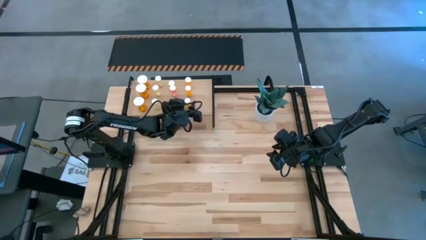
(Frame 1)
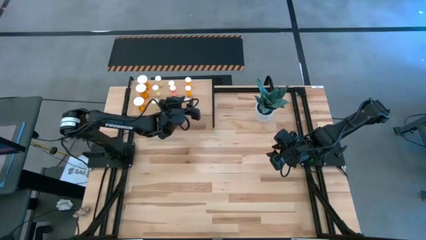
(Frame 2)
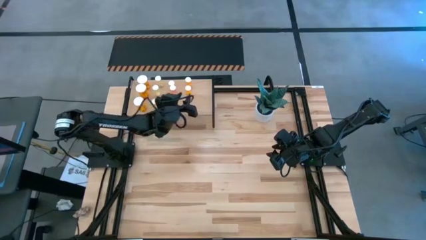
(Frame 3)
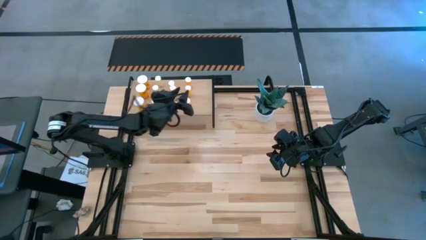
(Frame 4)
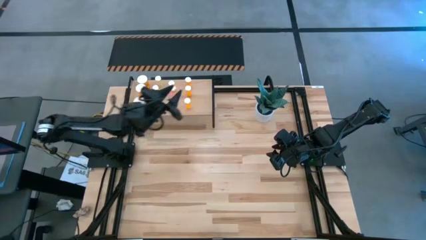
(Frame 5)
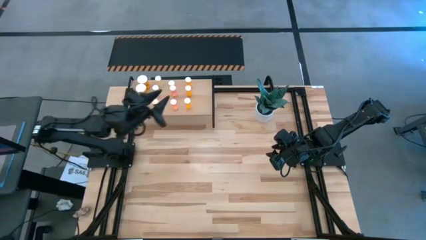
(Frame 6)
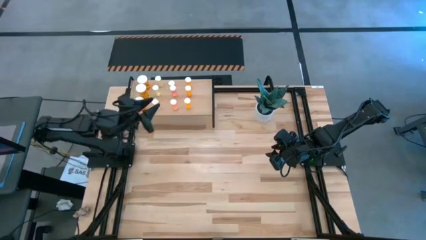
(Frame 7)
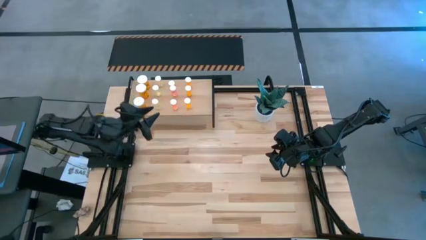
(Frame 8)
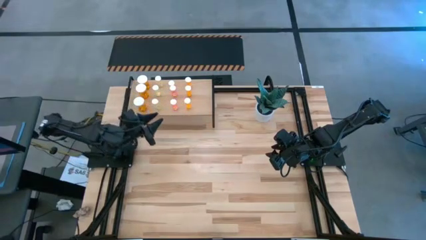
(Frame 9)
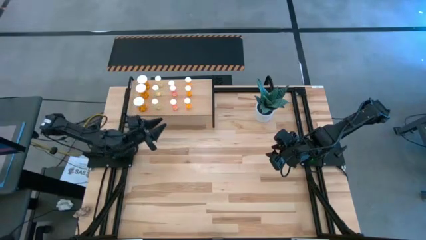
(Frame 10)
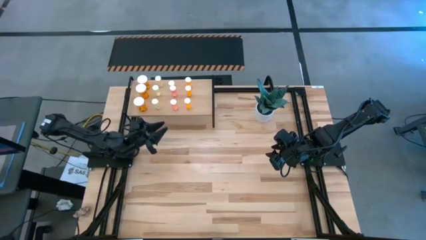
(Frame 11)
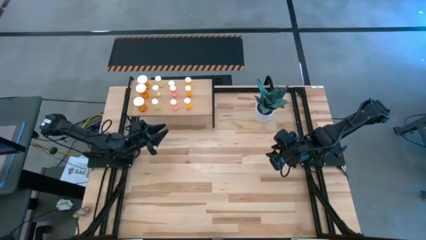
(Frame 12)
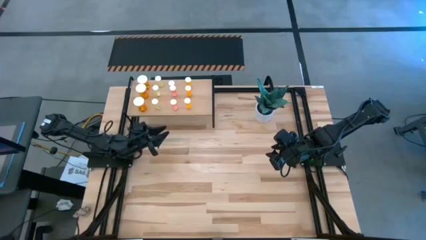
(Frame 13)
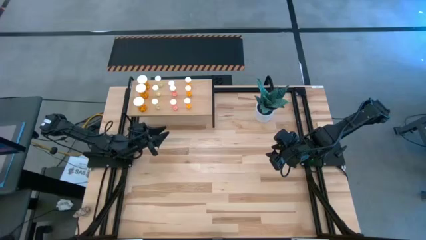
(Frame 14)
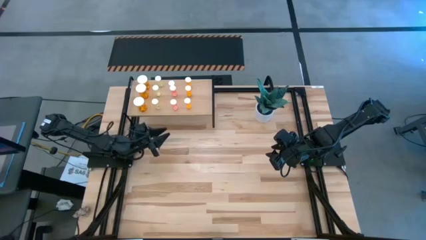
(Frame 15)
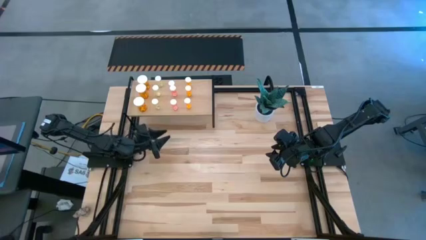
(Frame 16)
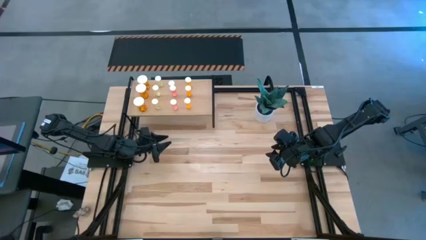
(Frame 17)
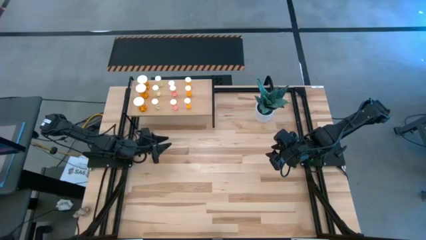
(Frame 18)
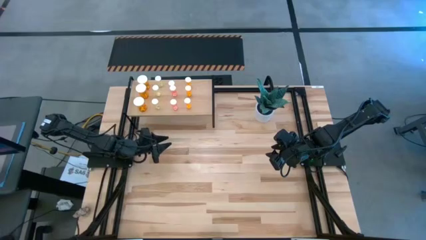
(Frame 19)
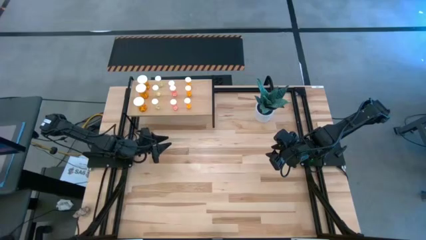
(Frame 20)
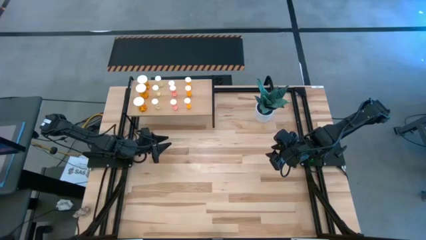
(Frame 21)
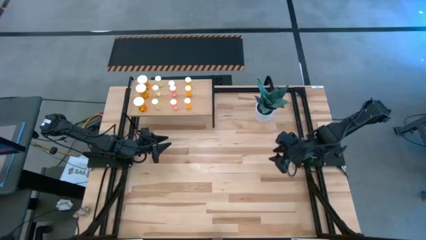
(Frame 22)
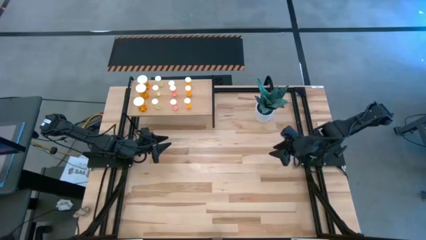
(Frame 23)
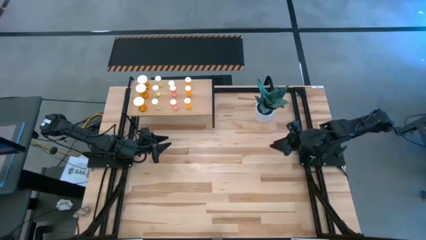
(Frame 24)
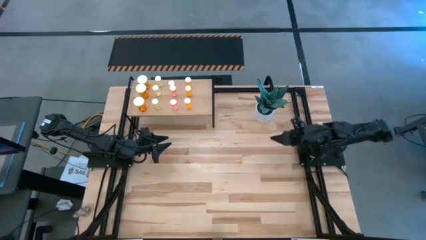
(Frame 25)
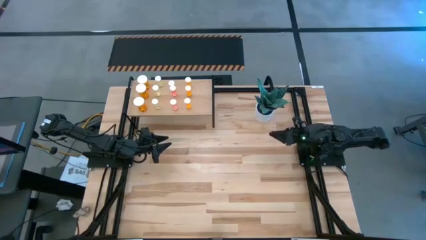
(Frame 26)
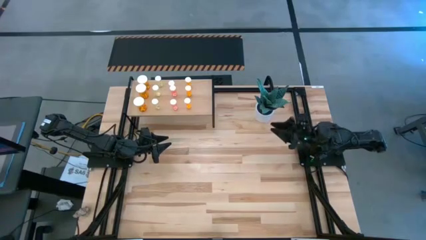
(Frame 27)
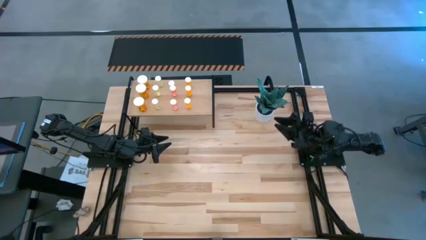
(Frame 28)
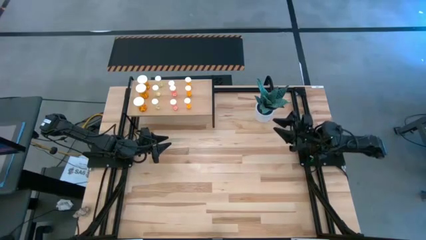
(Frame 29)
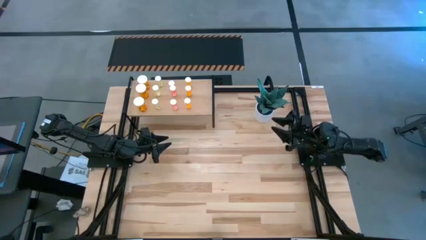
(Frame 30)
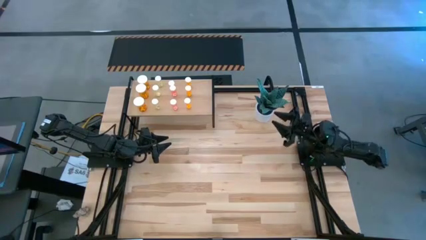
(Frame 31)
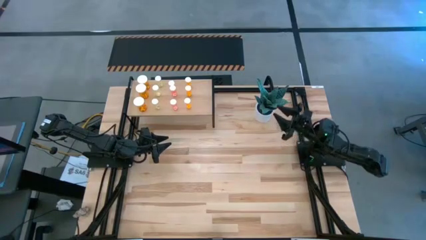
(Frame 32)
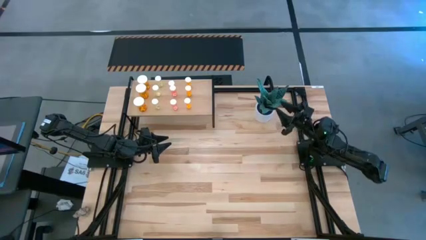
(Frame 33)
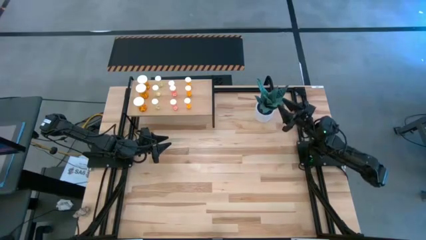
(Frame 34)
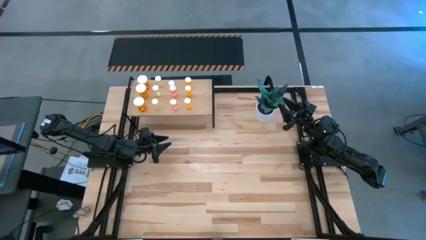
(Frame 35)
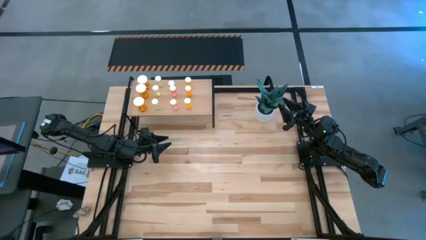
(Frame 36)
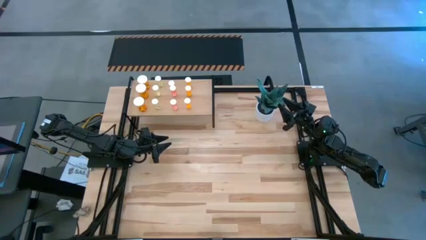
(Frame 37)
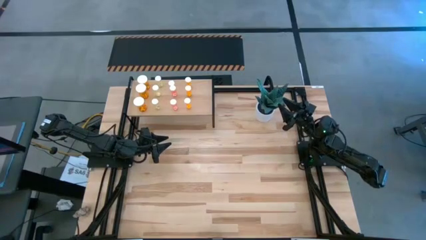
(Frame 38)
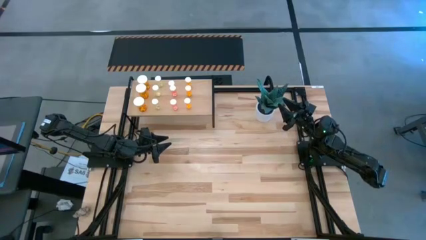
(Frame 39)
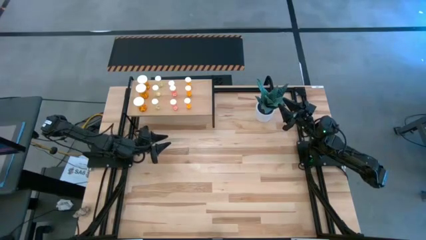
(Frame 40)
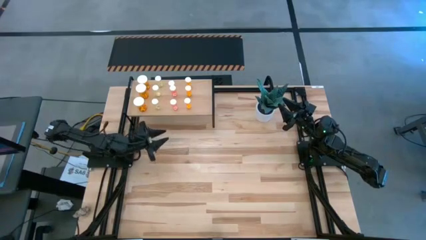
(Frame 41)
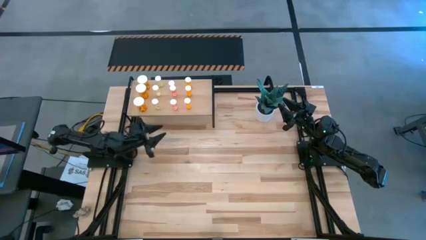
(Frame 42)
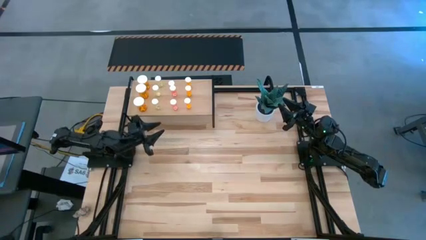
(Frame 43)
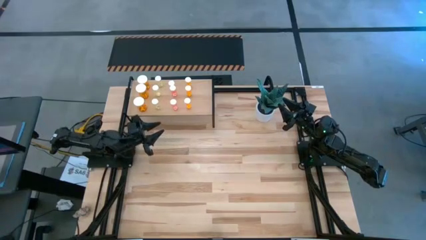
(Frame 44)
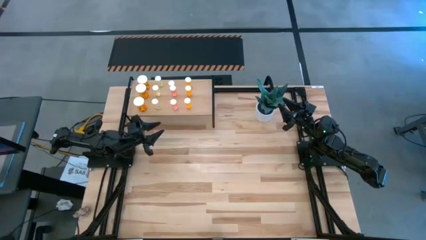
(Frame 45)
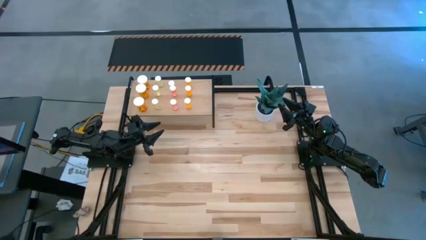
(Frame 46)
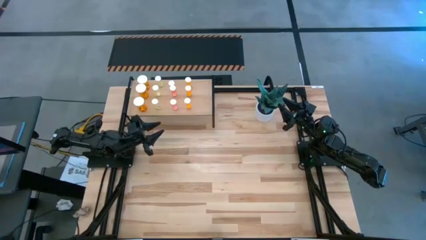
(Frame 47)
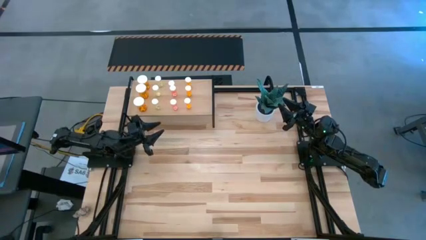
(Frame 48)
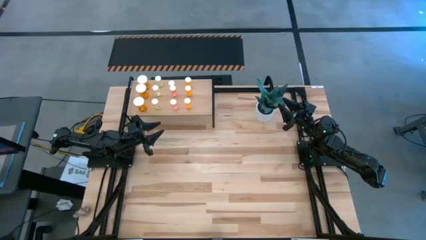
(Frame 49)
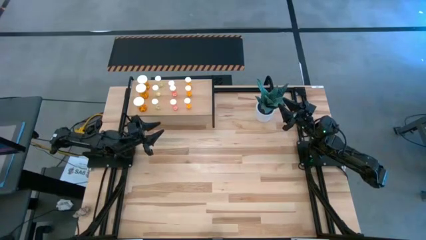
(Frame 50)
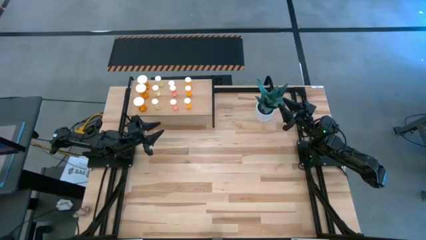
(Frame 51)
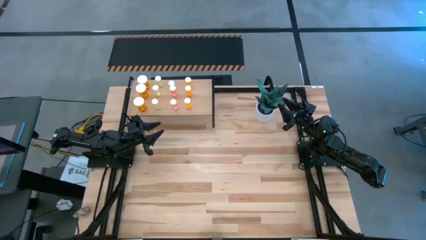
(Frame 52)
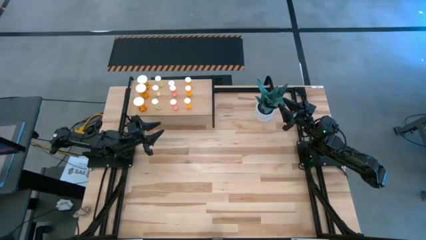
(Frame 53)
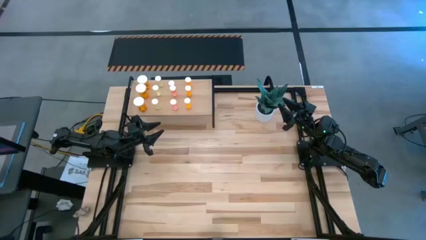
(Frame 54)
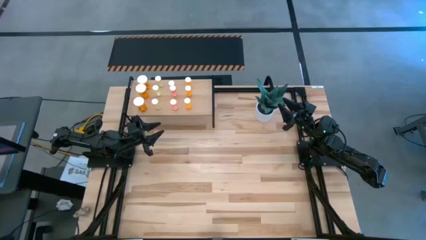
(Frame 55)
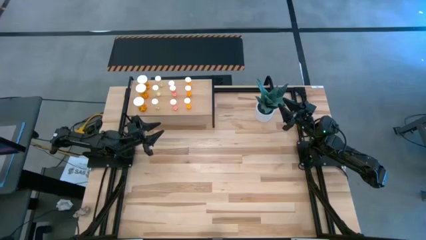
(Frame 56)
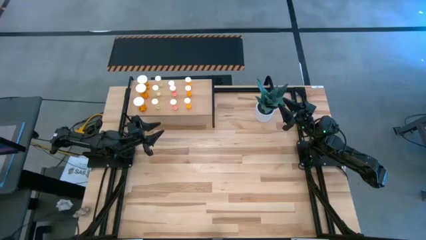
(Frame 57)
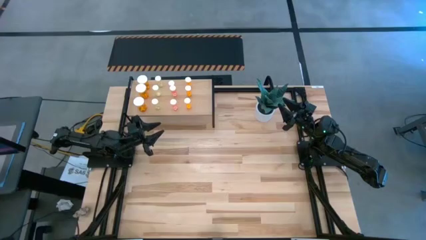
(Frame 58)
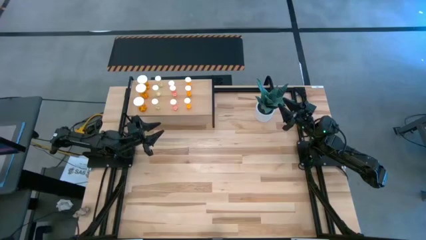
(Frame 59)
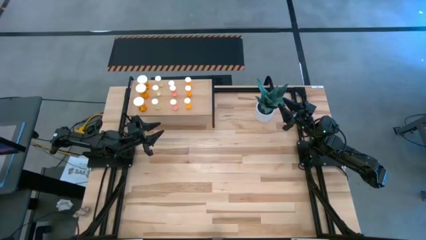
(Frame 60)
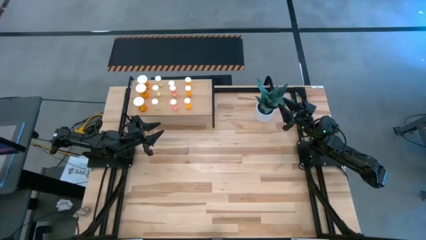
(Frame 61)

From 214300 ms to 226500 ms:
Task: Pick and place medicine bottles onto shelf by color
Return to Home Position
